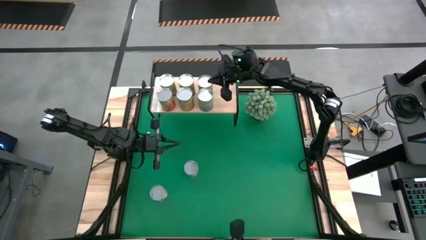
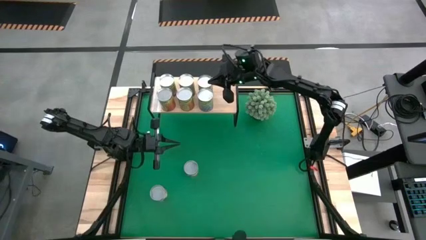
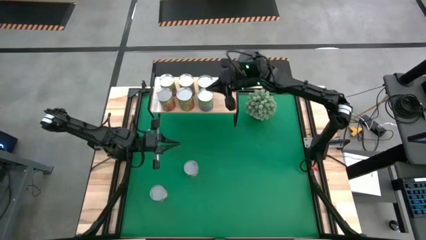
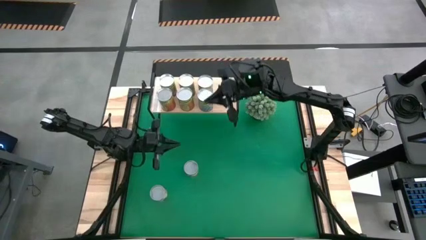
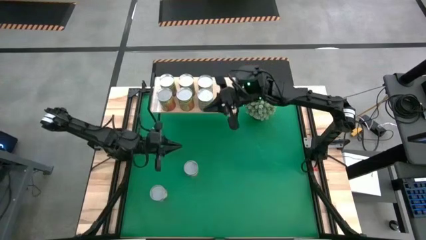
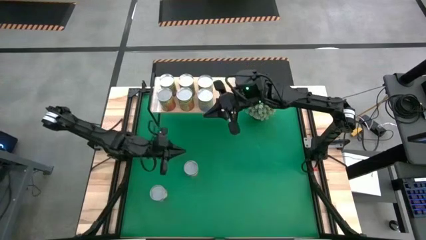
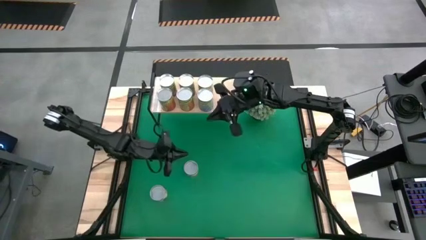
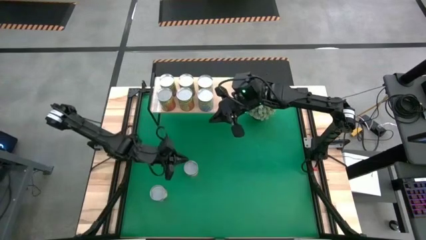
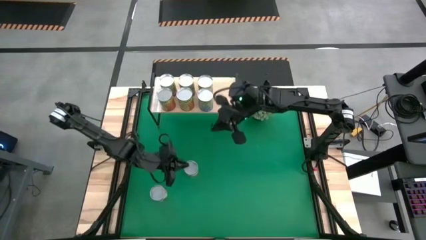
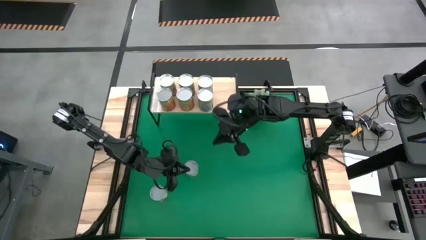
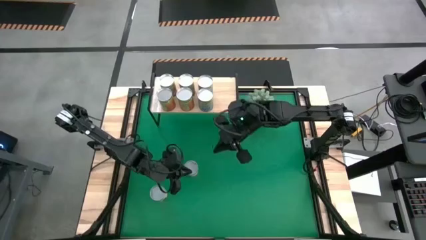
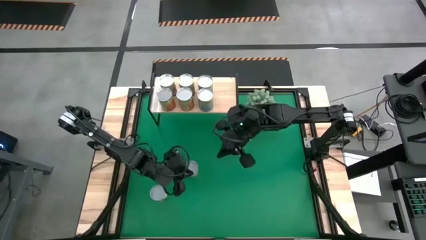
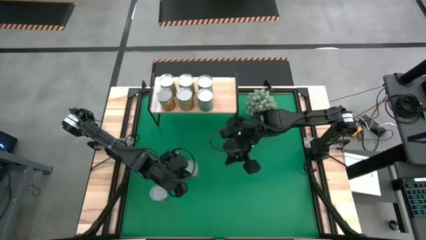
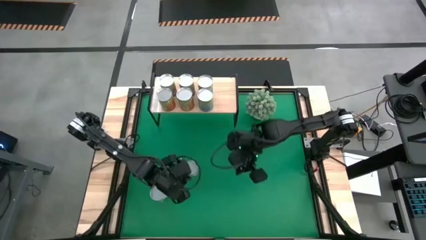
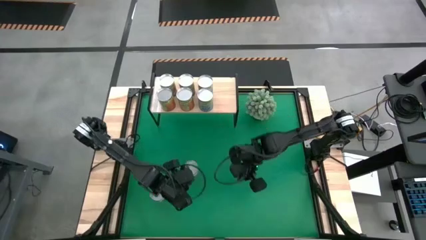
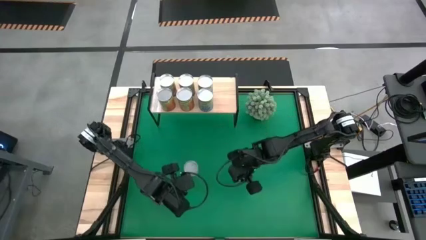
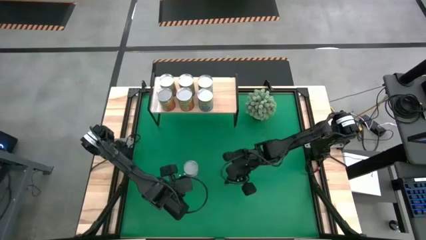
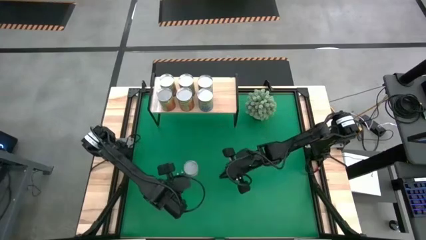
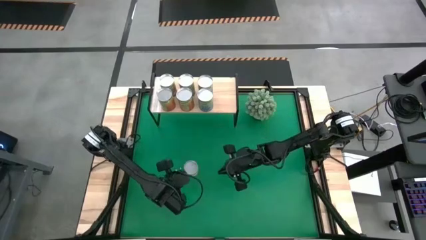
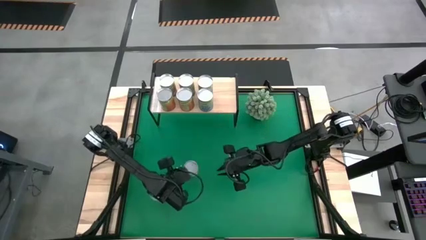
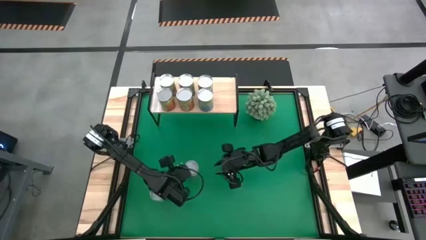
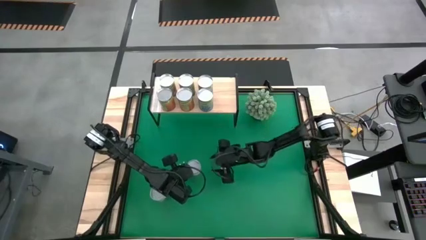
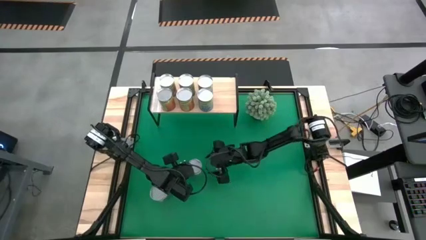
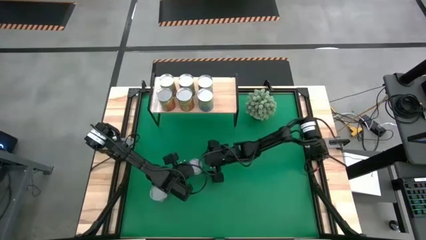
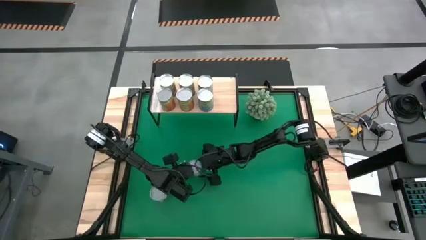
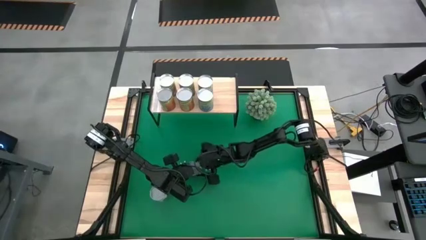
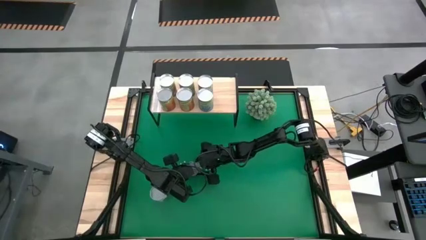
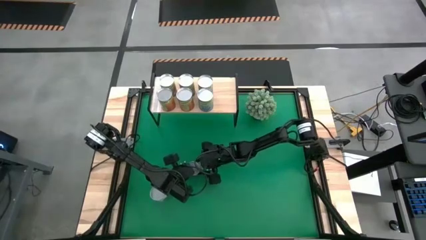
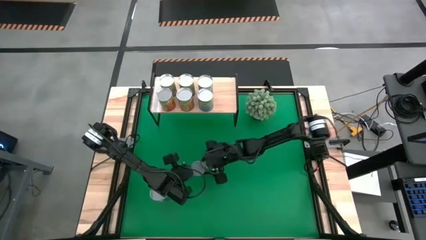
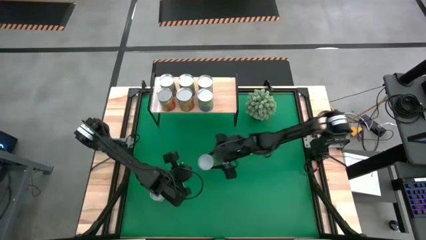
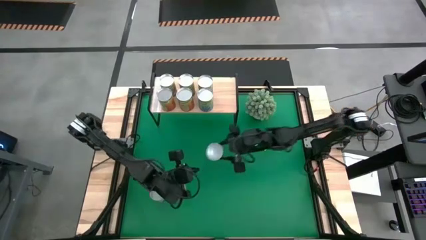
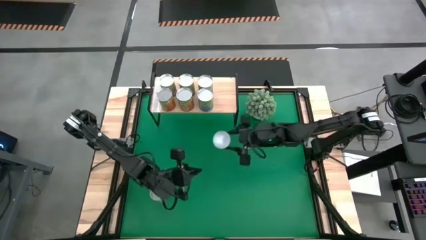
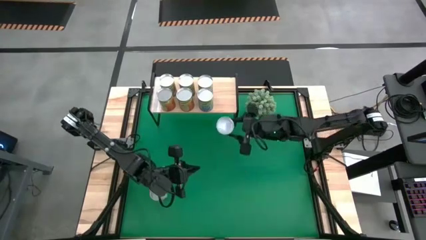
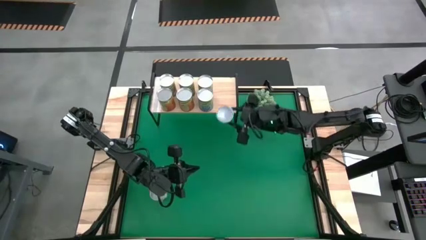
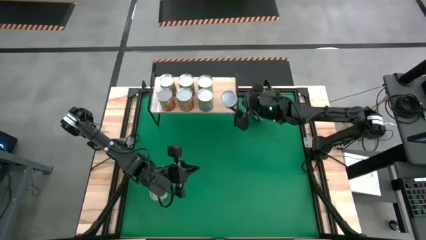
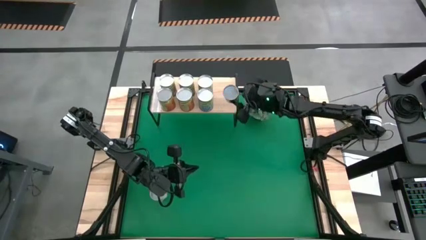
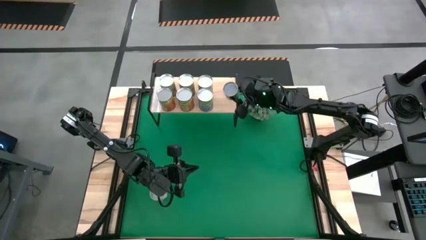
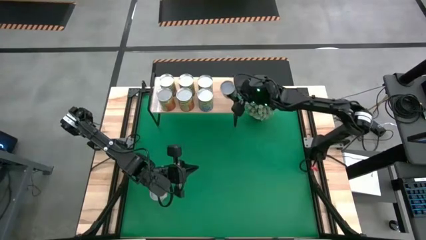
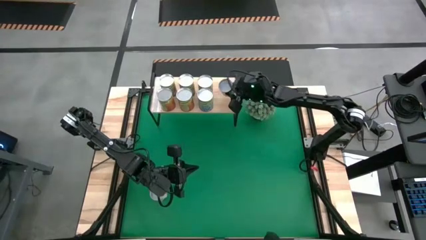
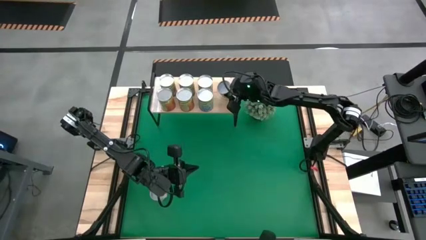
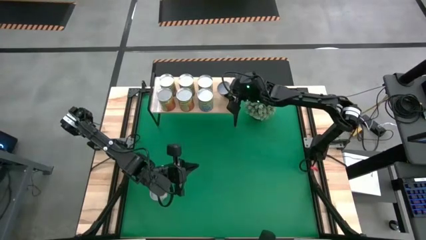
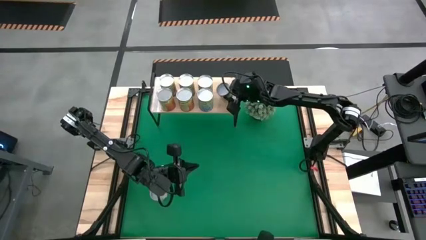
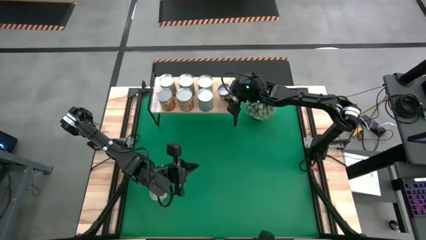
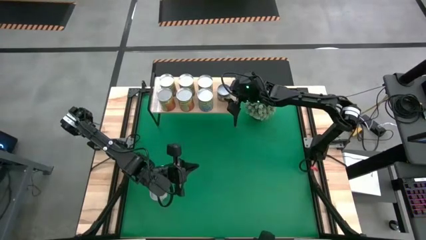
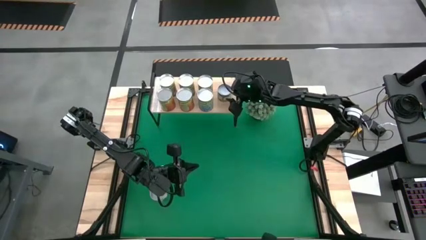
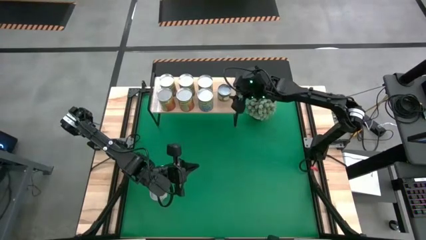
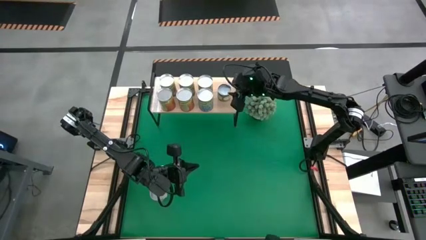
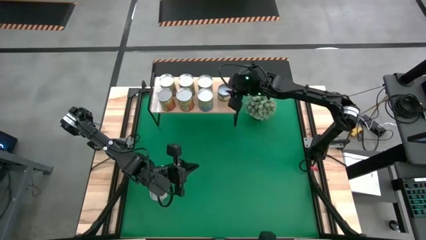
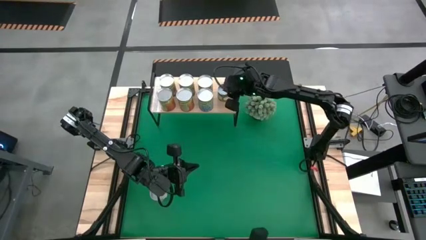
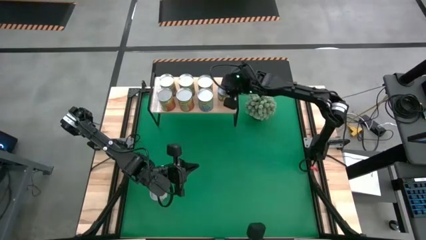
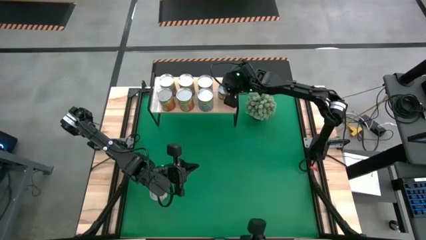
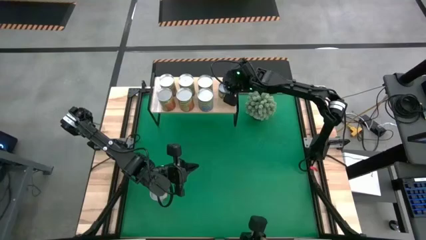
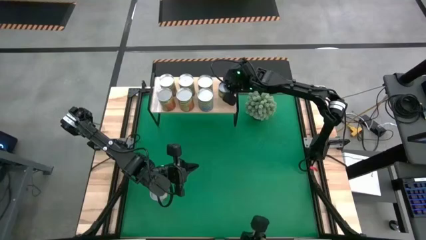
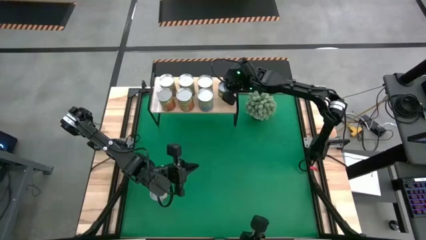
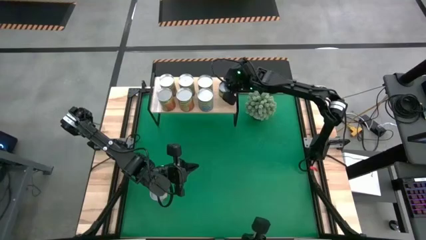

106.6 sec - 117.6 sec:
Task: Pick and place cans onto a shelf
Put the canned sliced peaches on the shelf

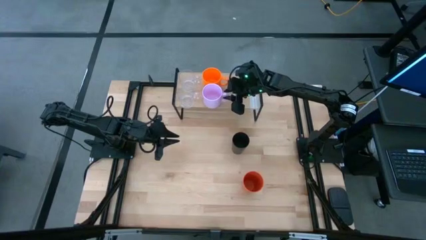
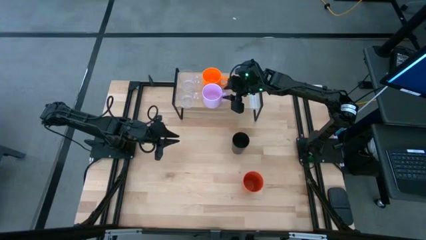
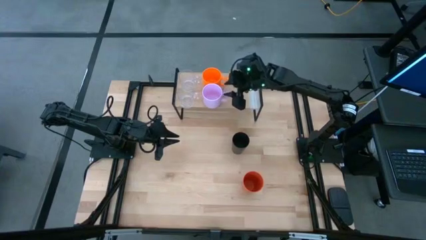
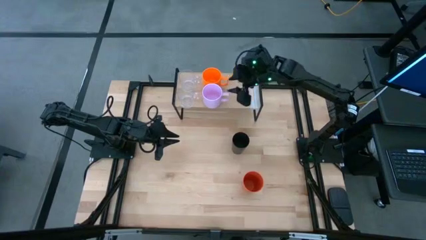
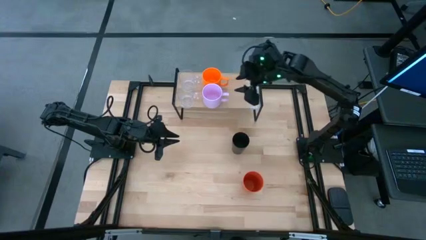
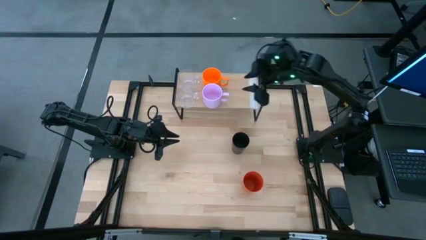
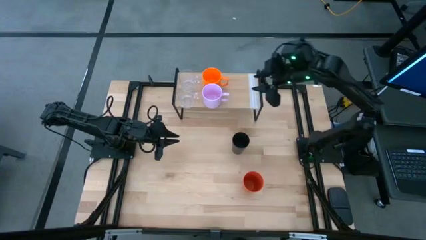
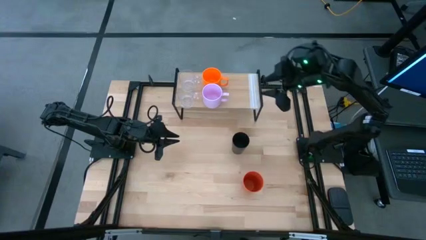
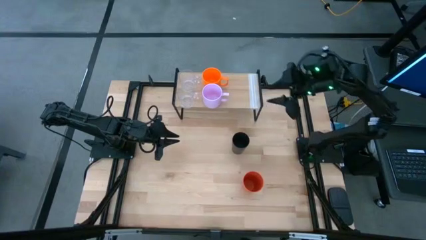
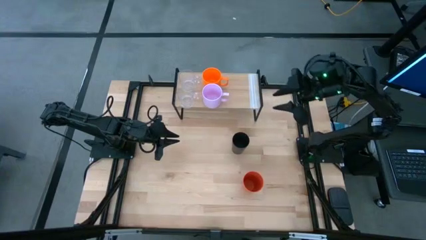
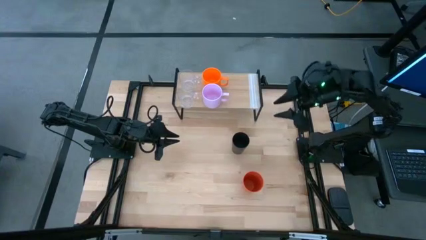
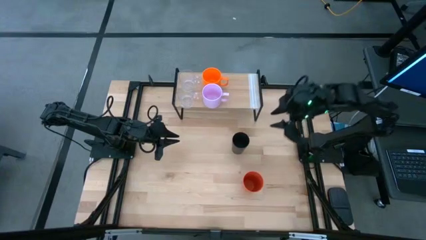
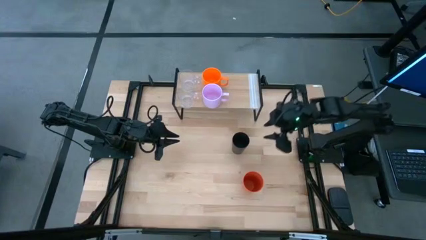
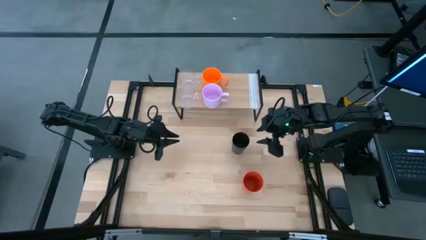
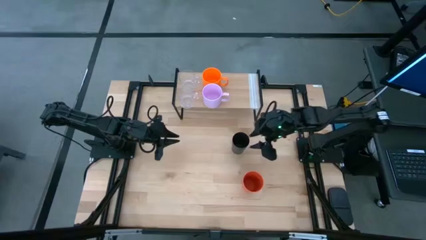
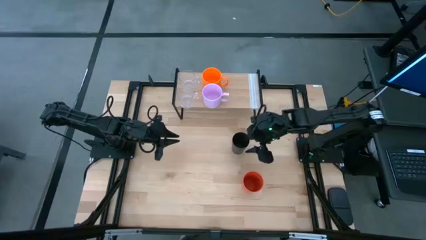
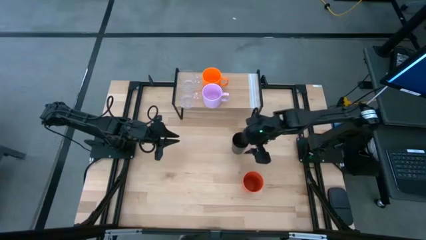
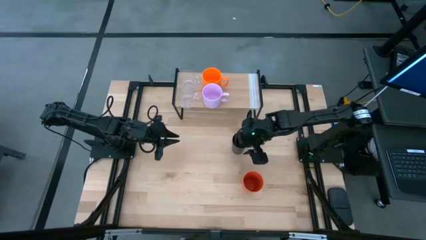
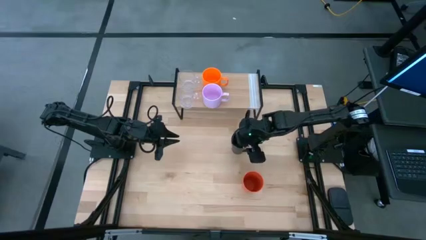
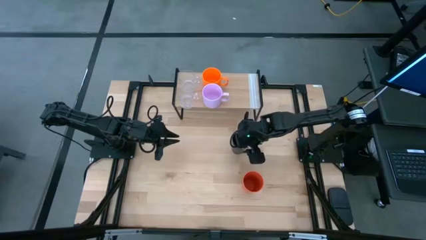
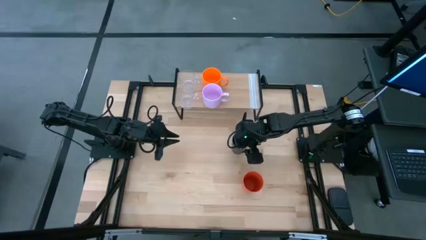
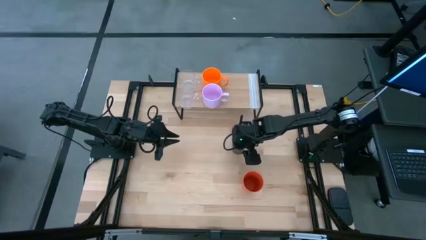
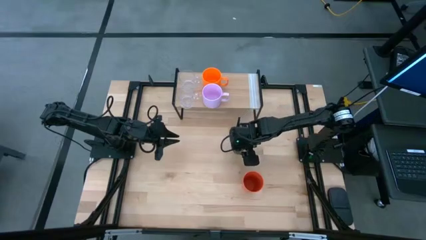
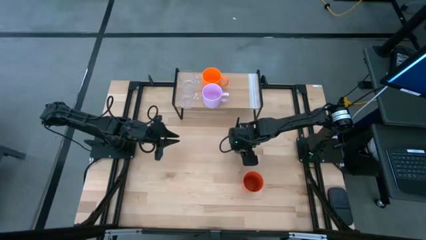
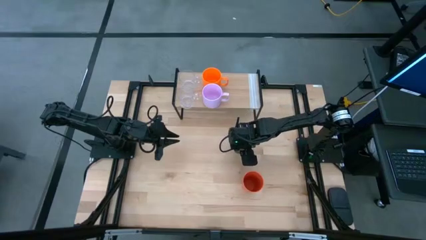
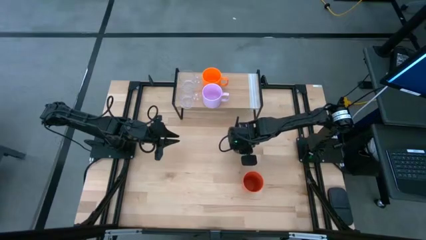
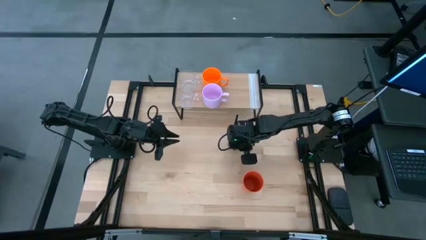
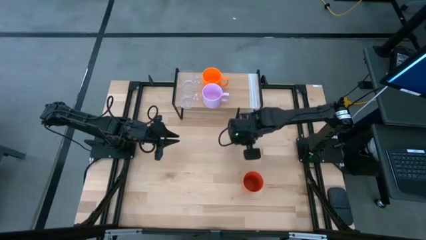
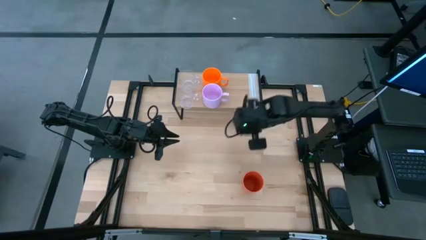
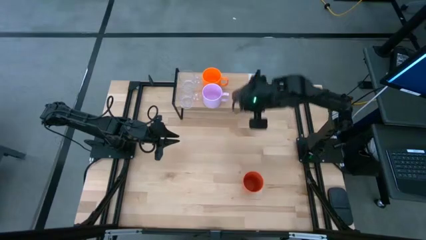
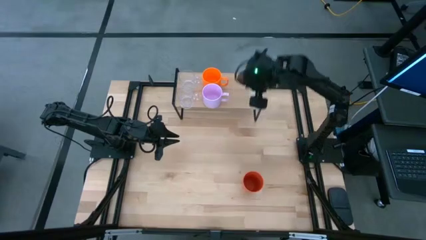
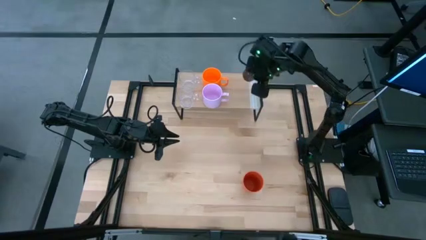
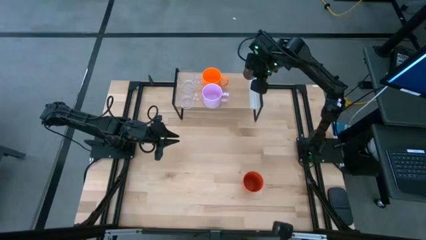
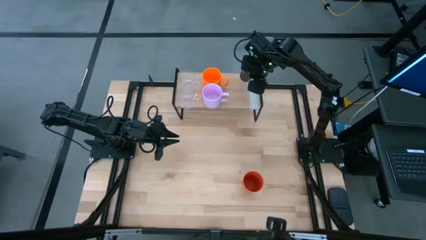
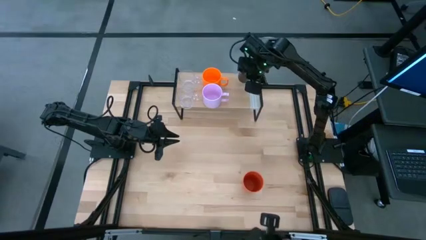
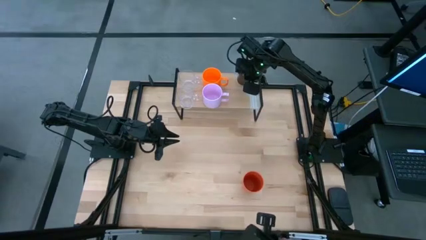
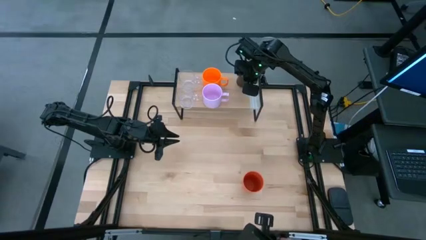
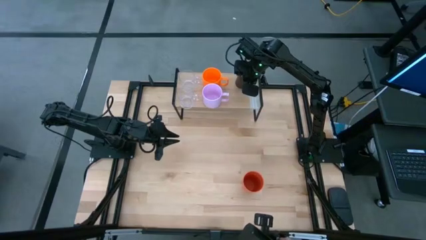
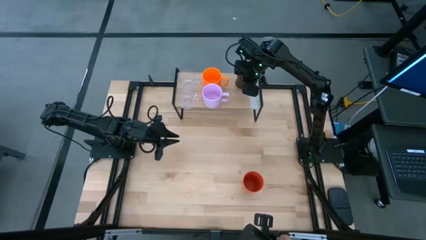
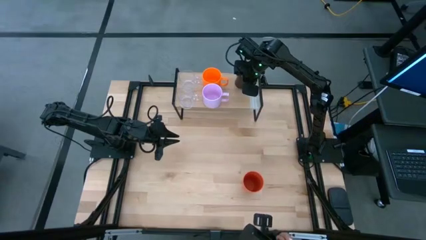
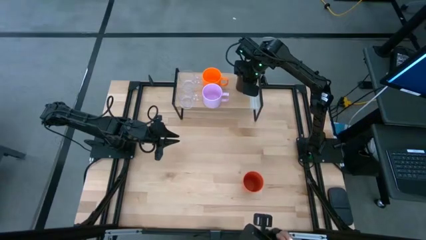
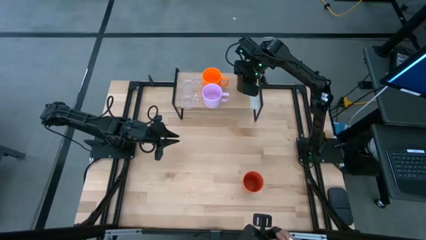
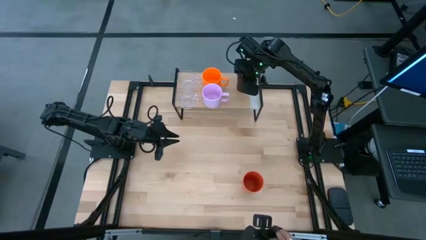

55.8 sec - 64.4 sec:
Task: Stack small to large cups/mugs on shelf
Put the black mug on top of the shelf
